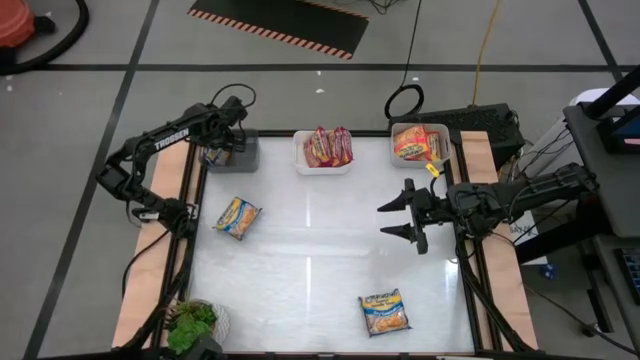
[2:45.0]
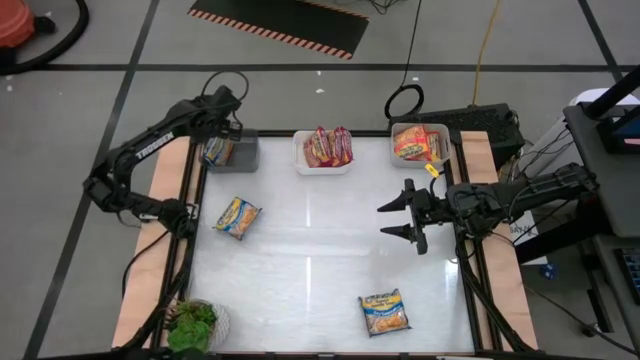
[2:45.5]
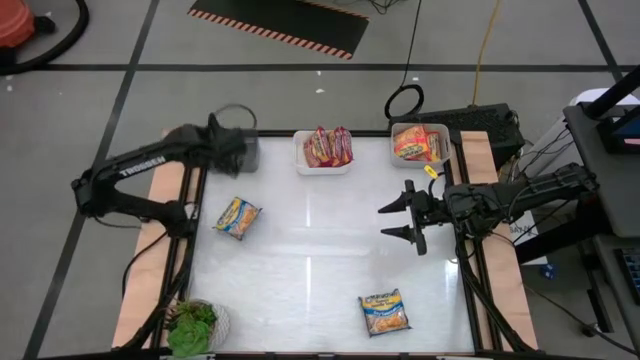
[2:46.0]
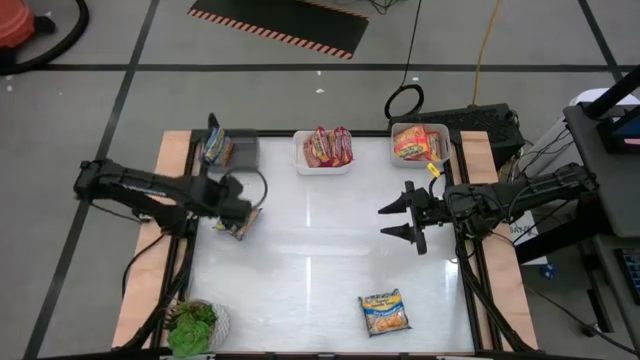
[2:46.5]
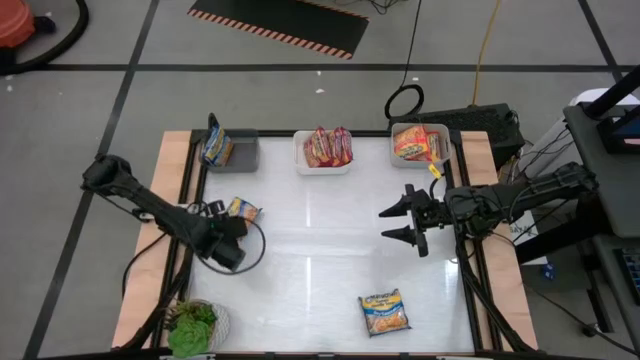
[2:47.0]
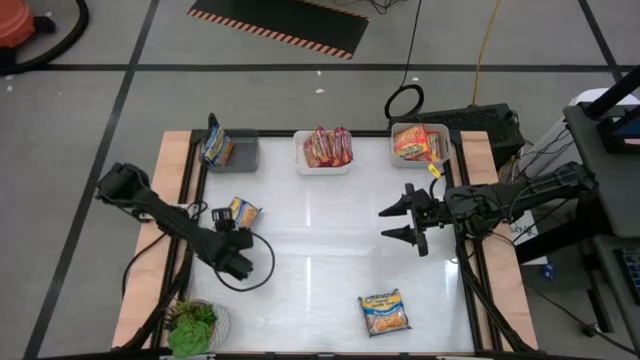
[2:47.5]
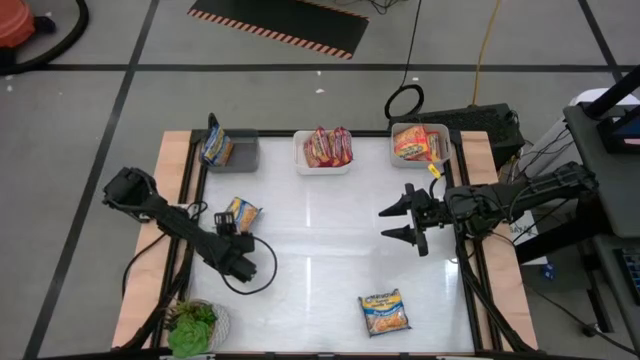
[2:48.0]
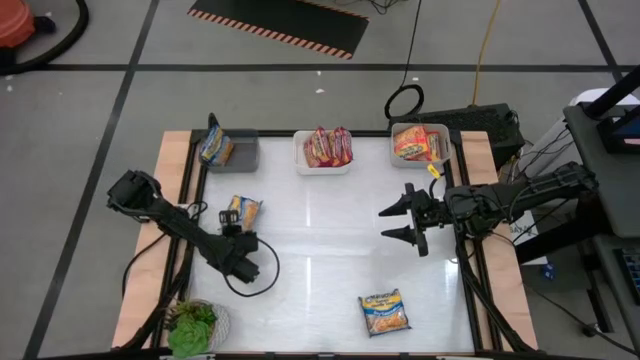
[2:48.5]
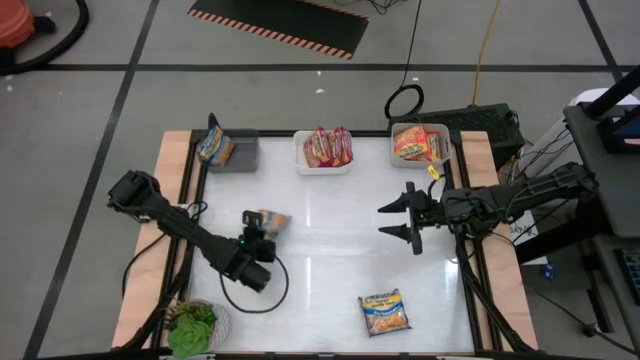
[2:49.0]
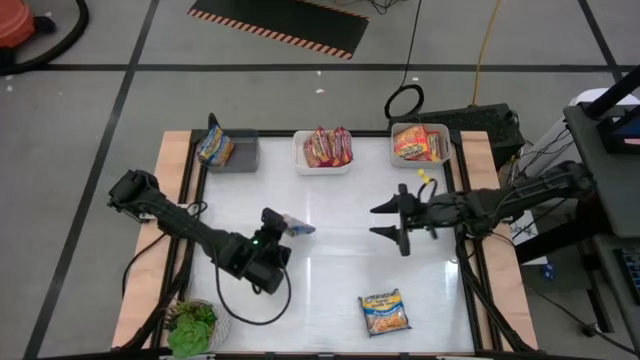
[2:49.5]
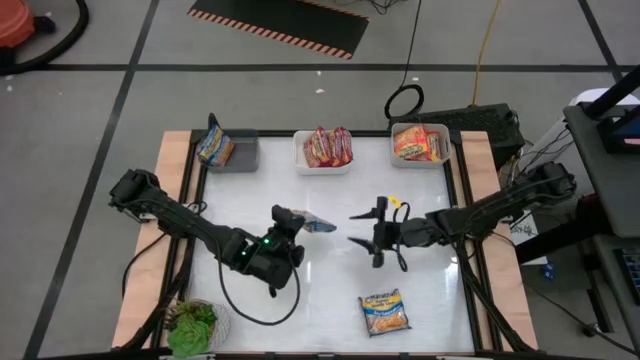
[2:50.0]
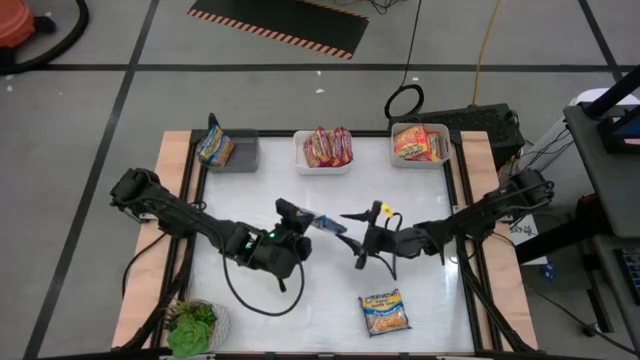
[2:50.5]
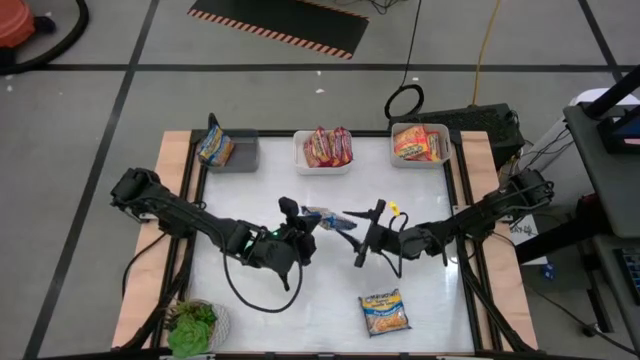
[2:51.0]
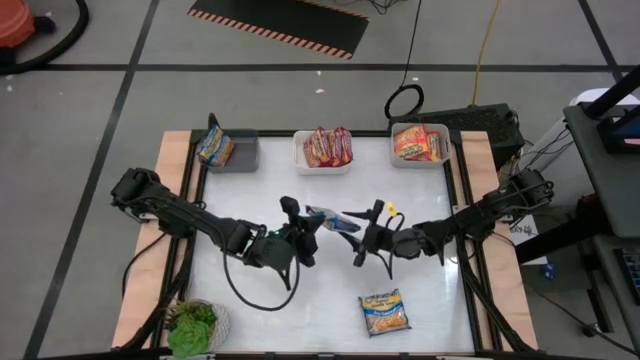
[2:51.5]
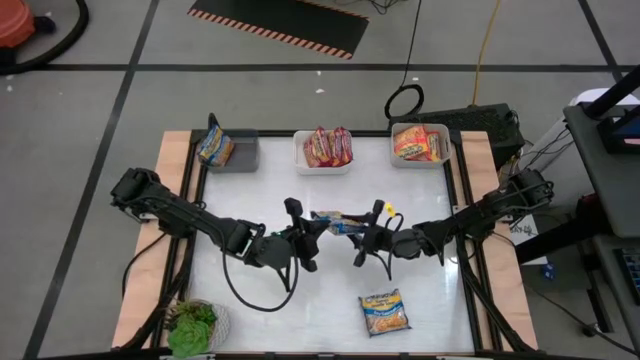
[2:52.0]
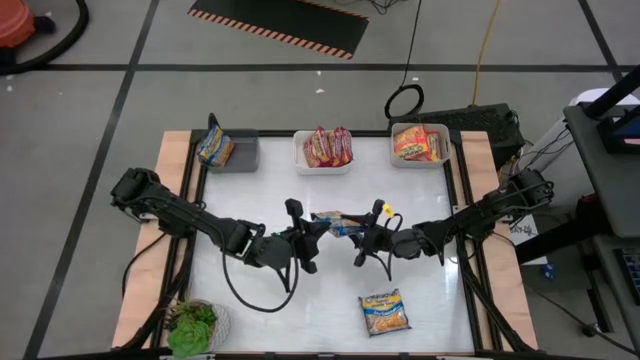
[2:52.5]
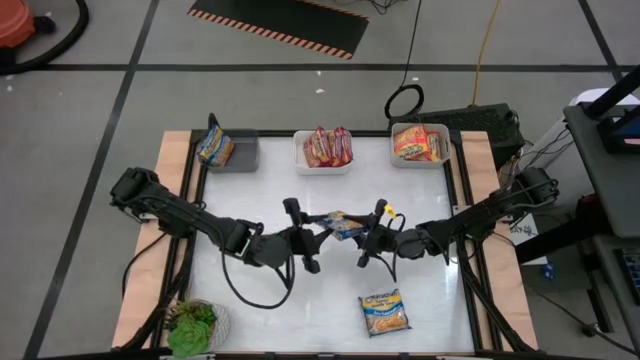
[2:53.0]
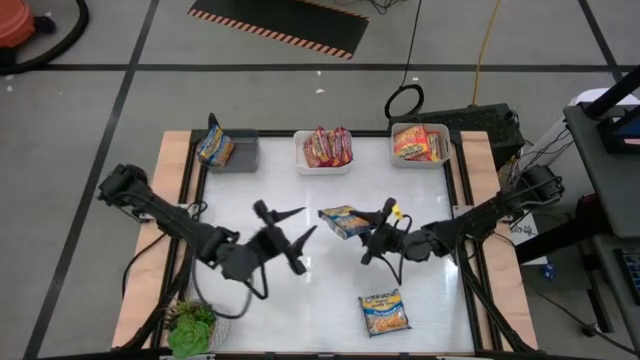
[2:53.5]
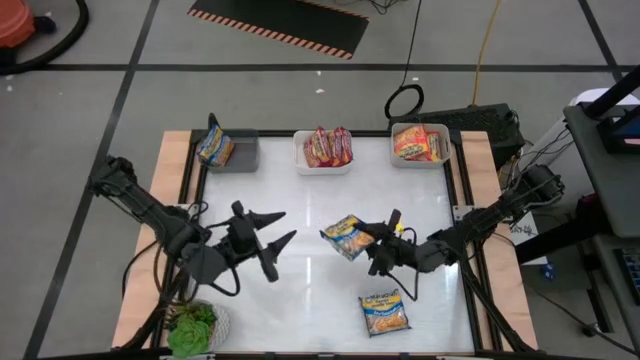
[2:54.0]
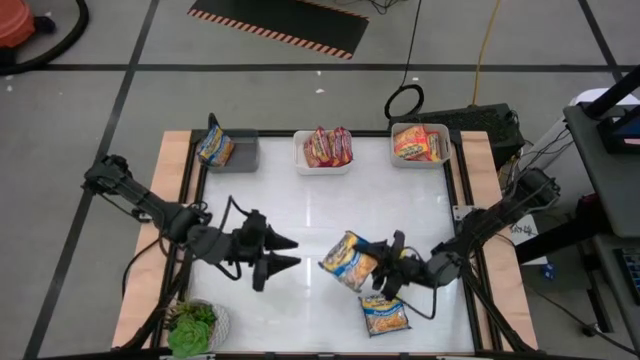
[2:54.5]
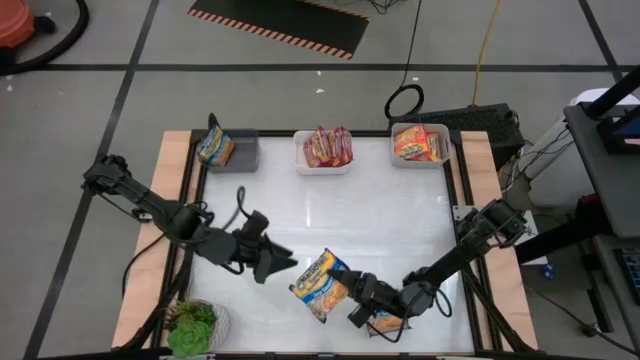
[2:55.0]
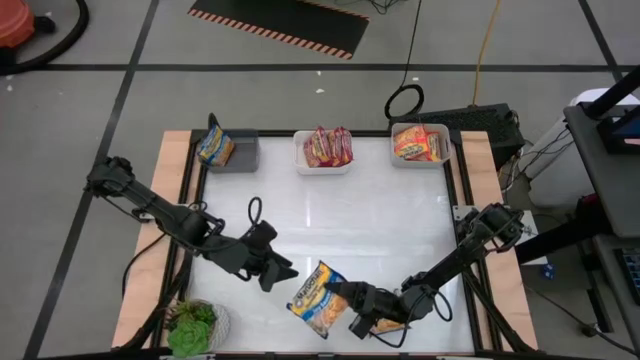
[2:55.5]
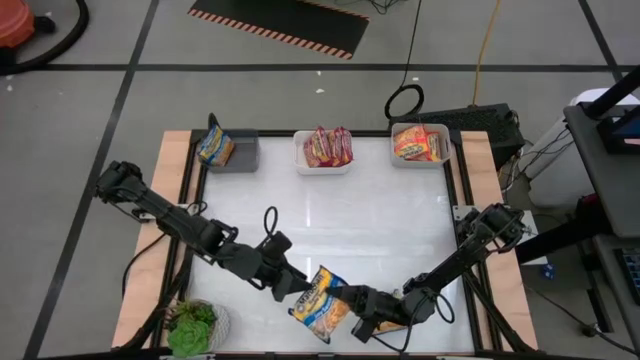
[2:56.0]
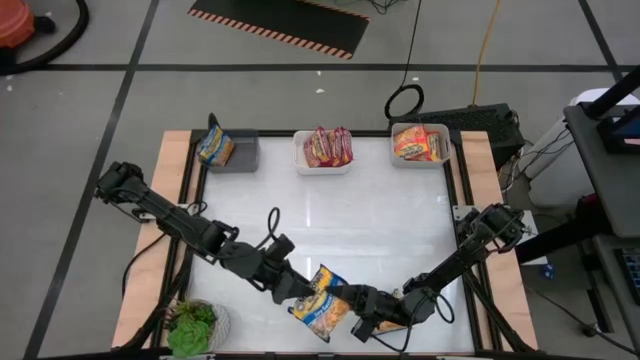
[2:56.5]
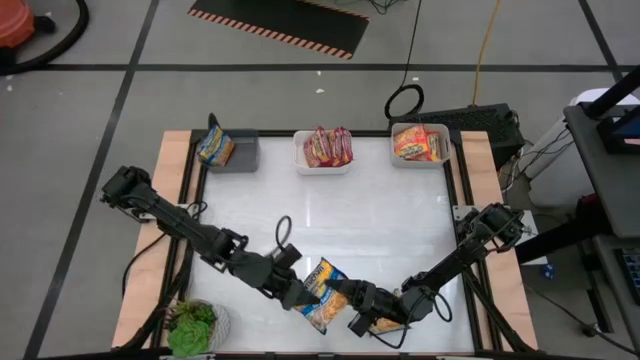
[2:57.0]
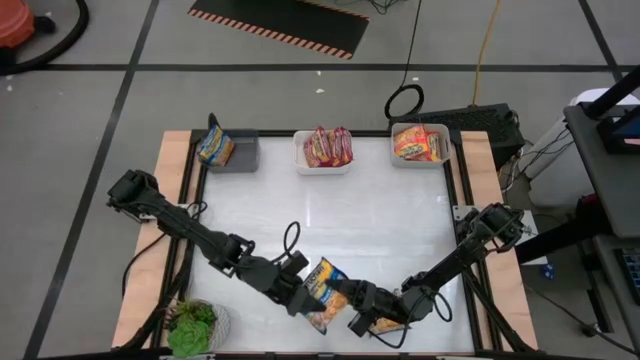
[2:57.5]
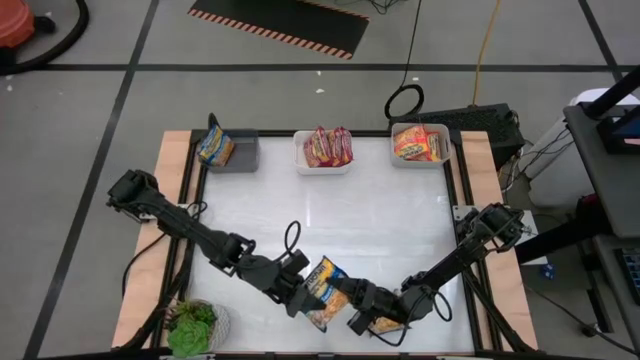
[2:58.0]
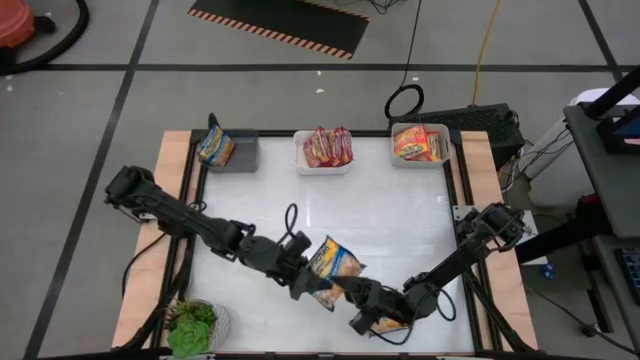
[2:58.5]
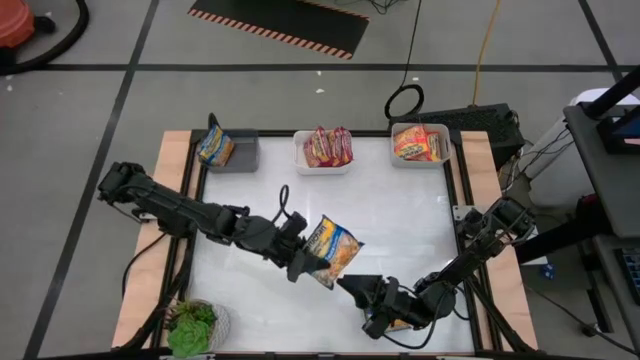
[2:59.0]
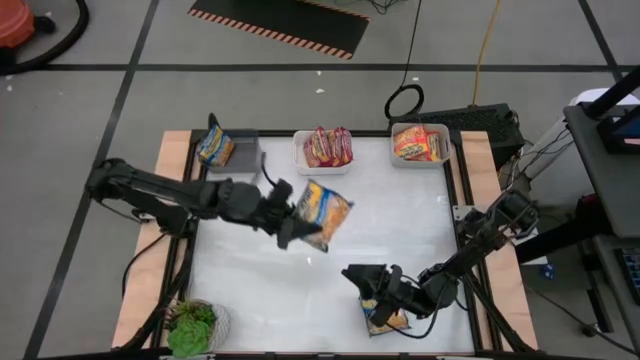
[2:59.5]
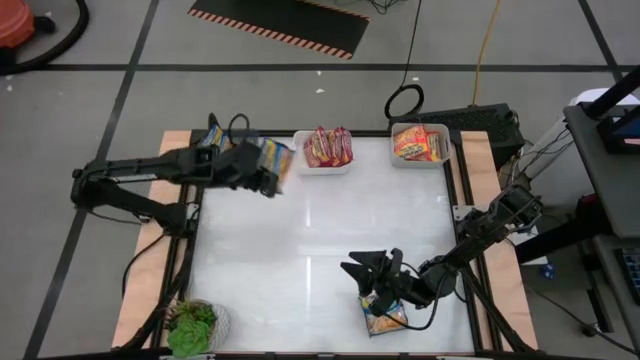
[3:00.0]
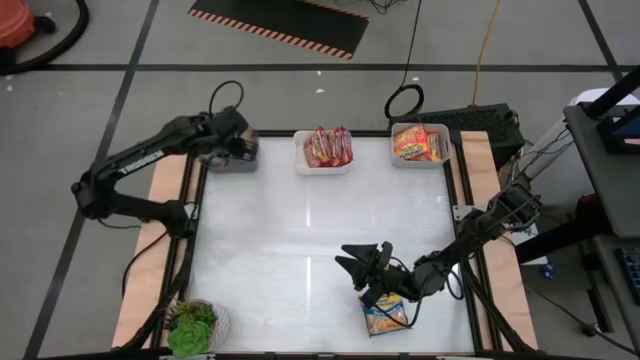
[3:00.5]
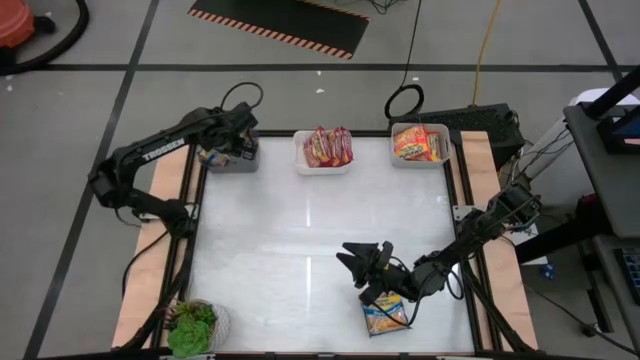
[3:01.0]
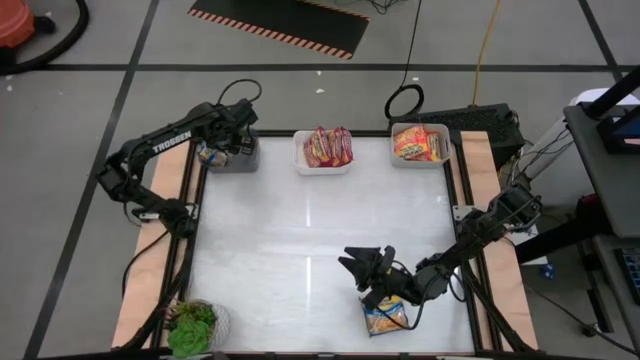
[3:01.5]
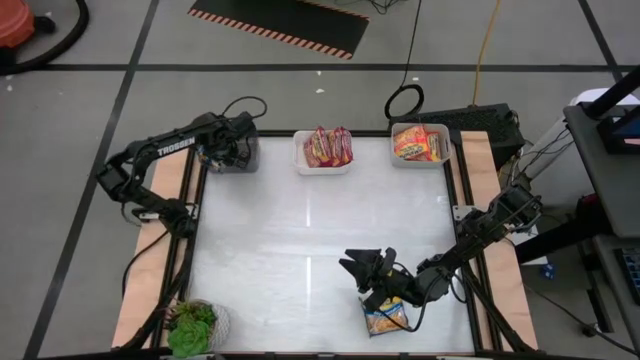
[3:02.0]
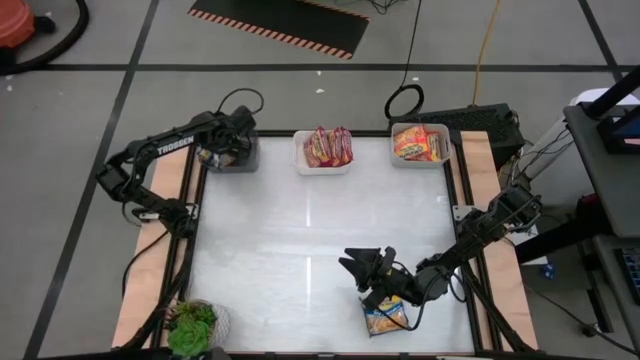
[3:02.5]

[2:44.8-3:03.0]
Task: Sort Maruchan noodles
Put the top blue noodle pack into the black bin
